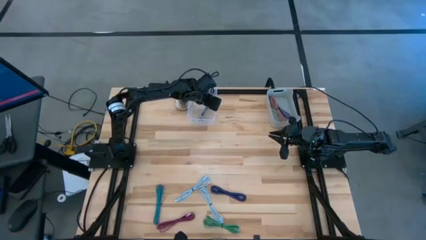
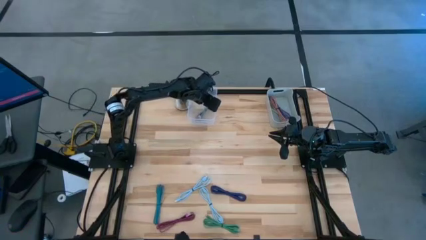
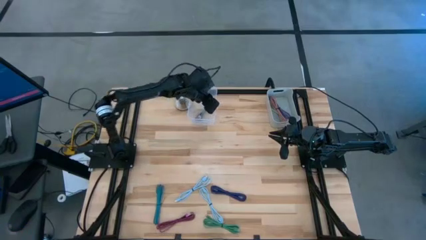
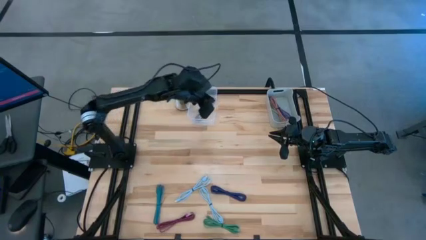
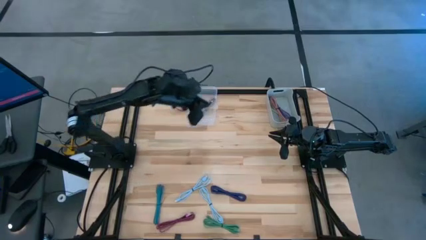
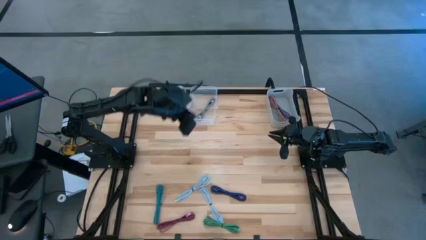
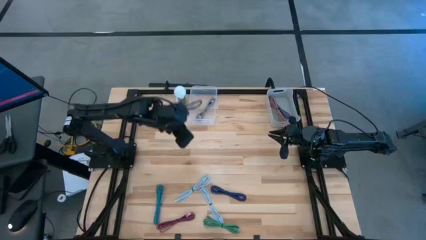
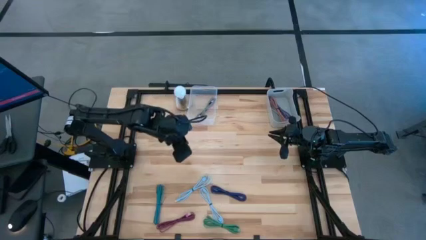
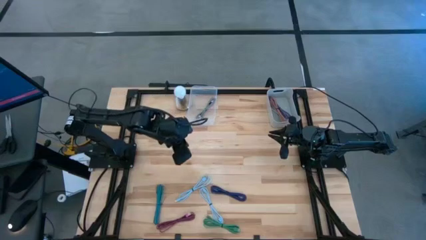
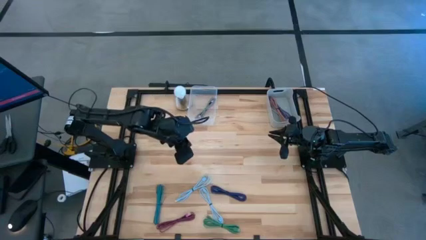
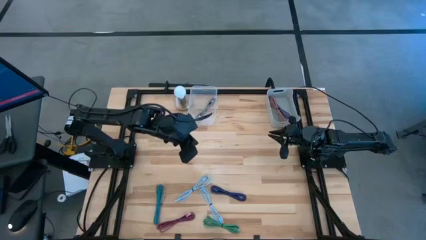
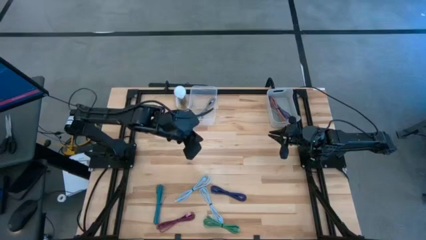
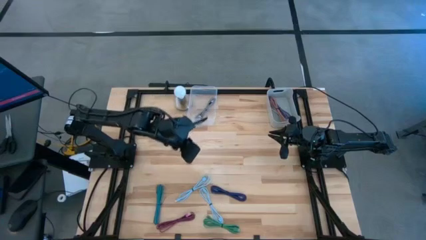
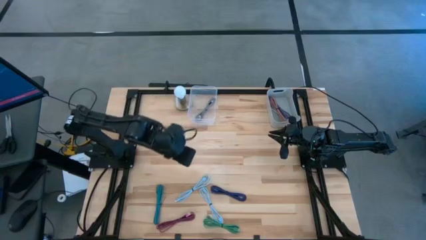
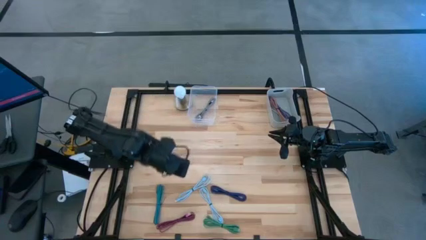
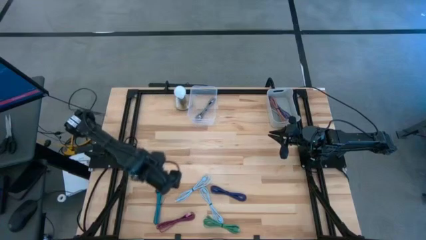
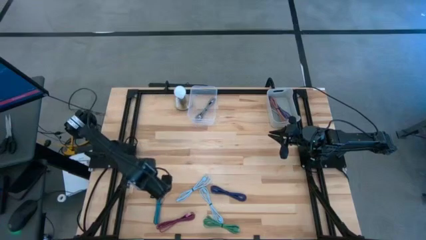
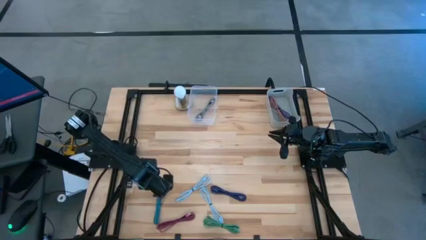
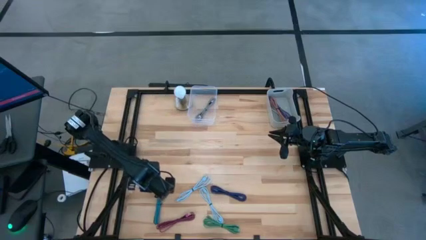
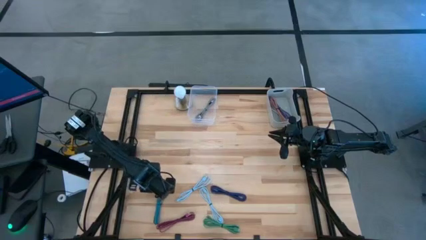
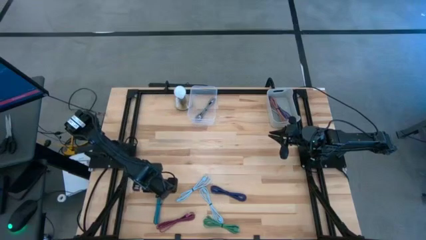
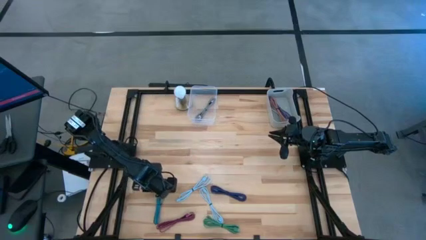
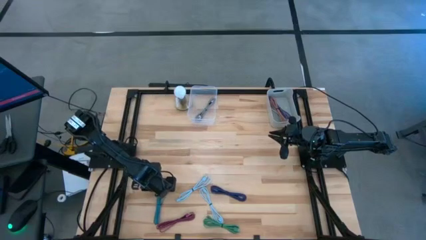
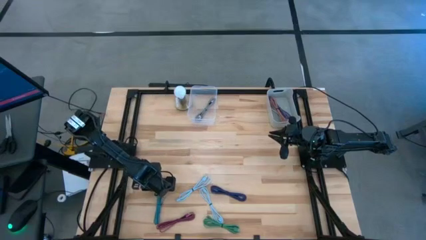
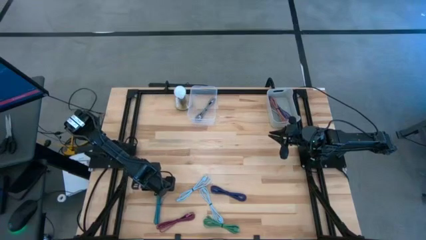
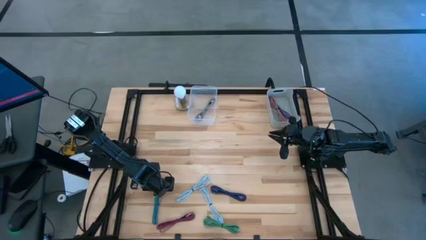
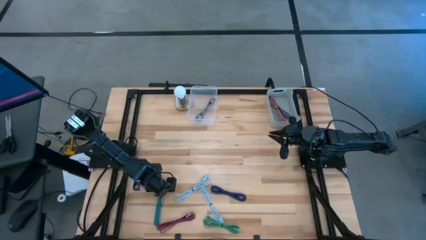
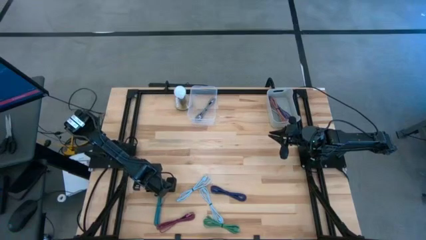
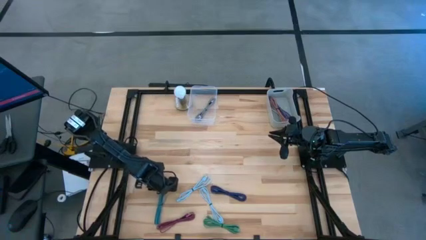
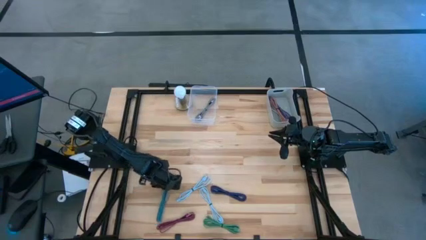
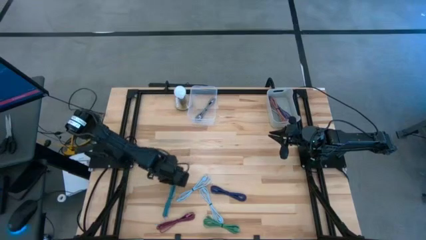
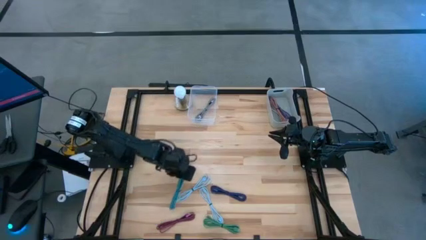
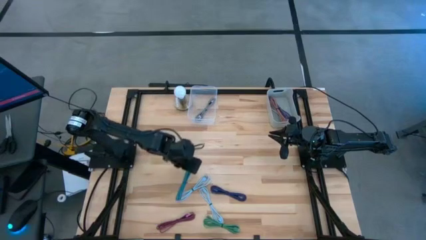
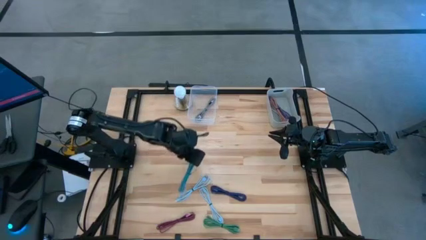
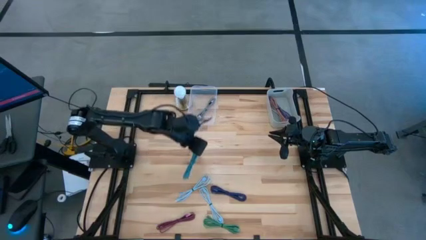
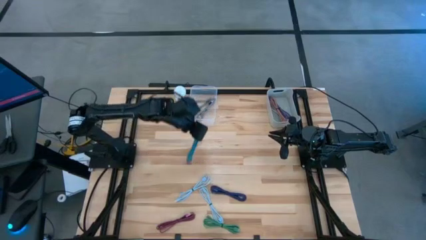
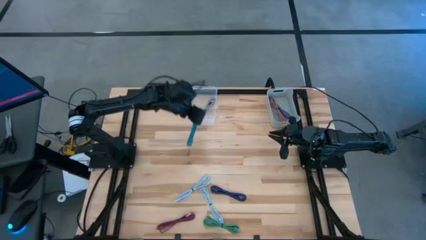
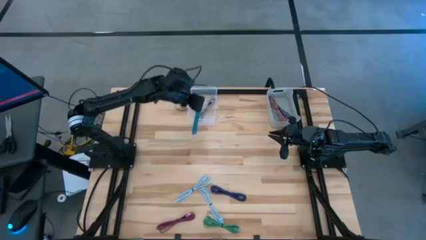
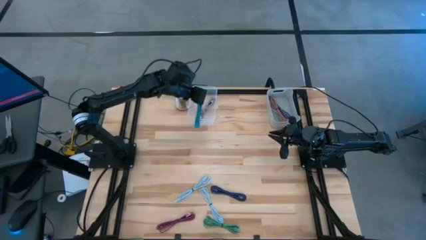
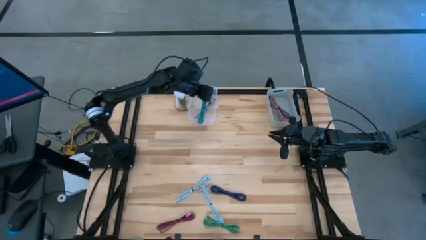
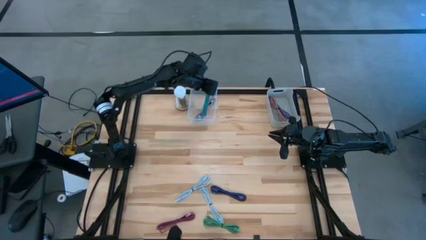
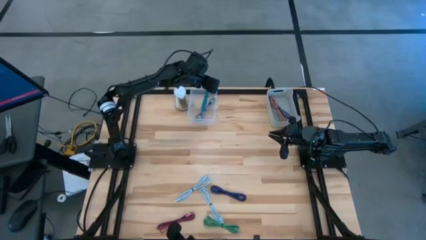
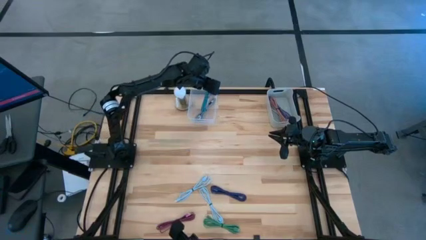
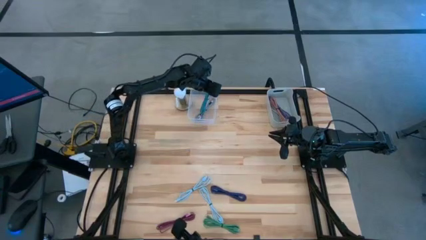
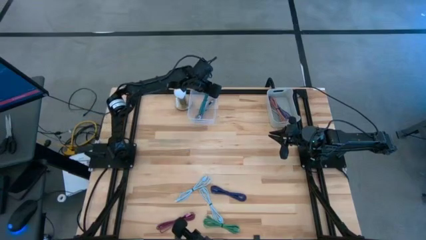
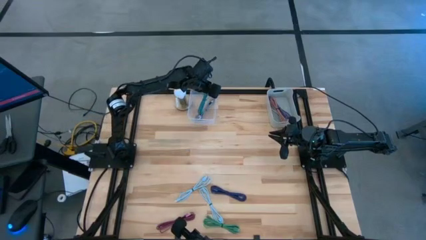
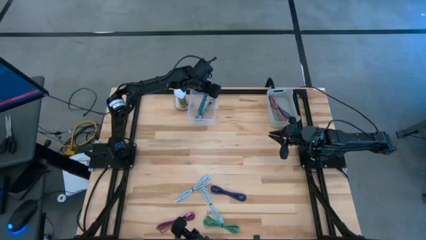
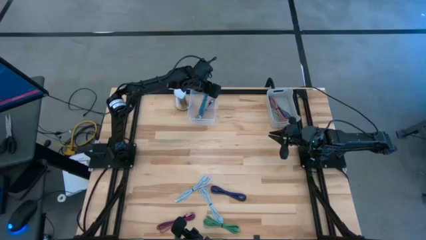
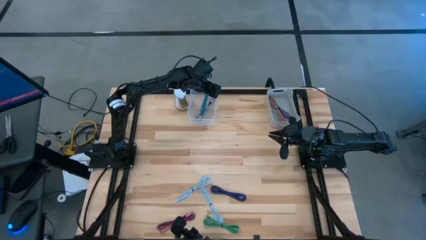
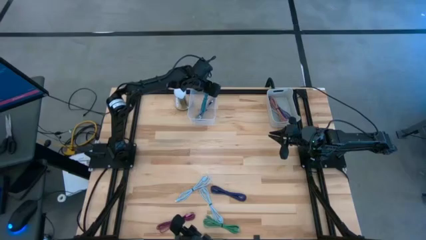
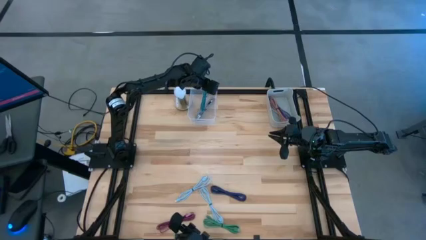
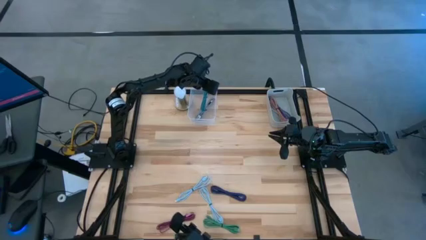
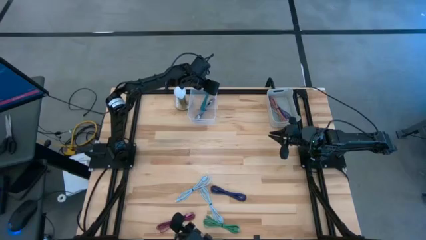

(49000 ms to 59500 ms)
Task: Pick & Place USB Port
Put the black blue charger cable into the transparent bin

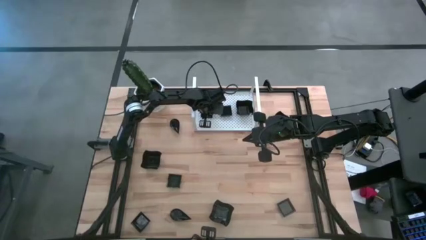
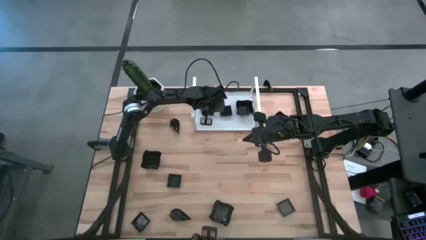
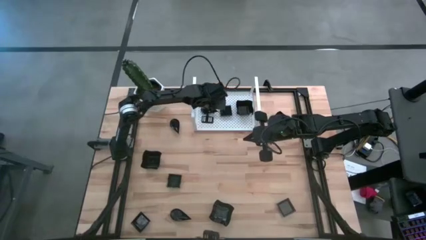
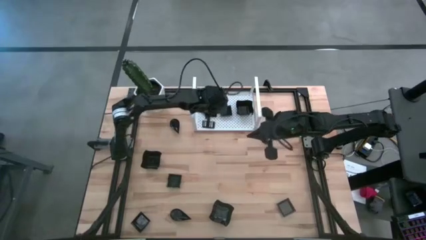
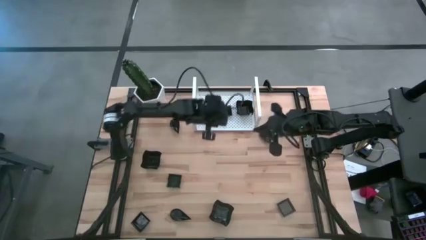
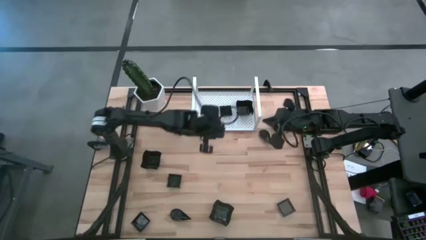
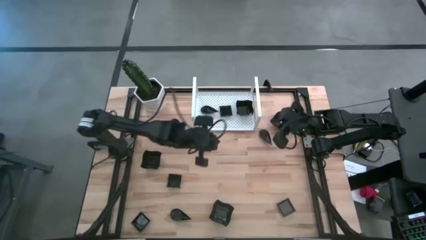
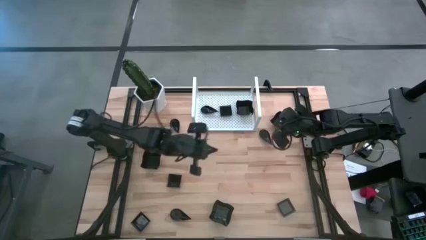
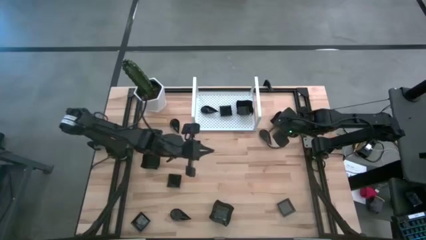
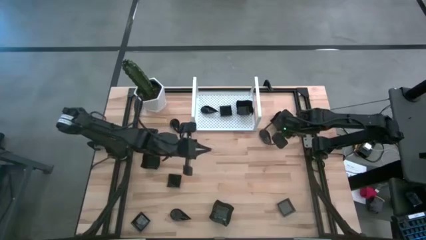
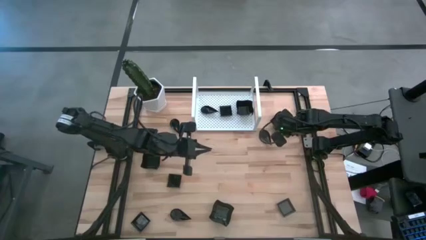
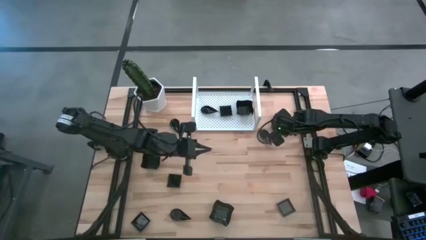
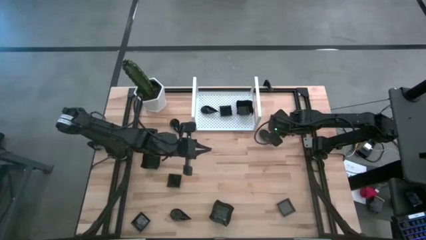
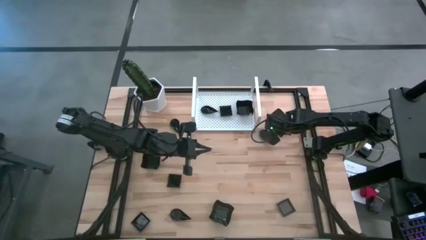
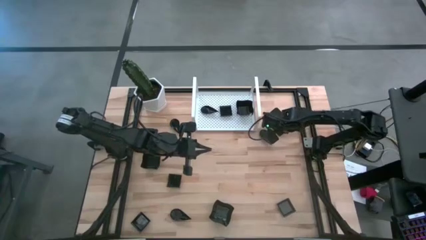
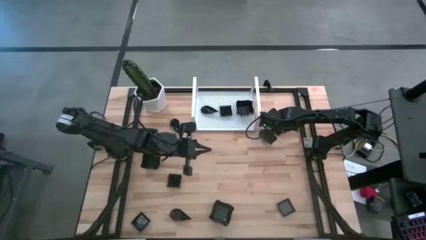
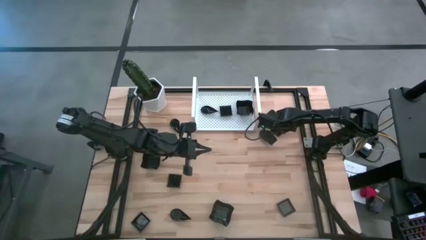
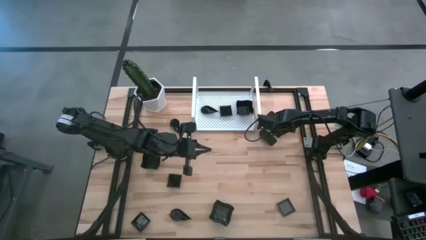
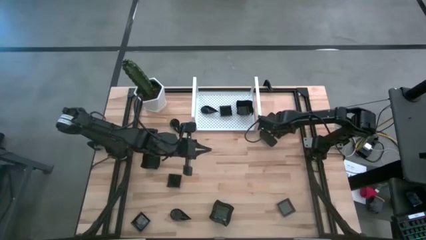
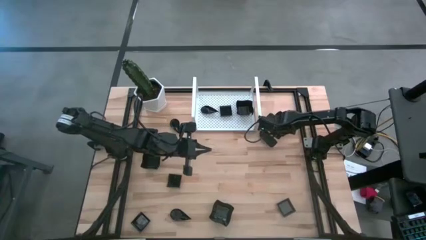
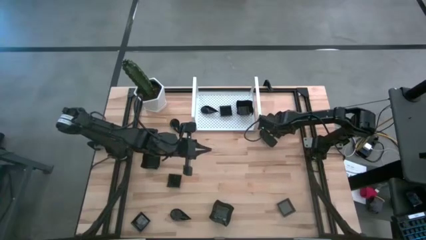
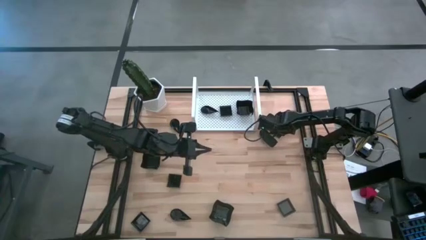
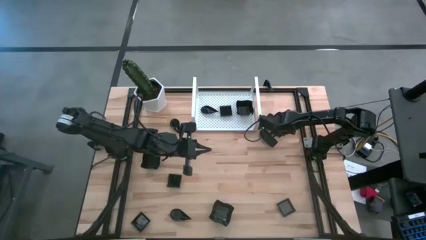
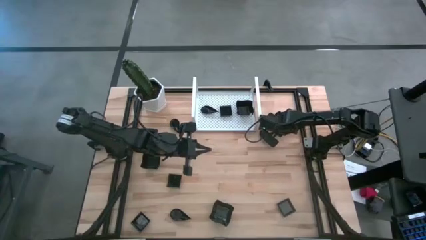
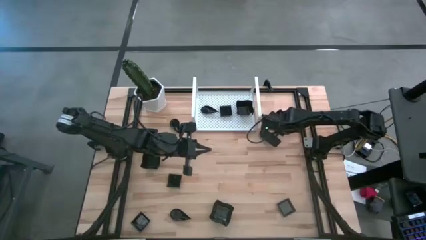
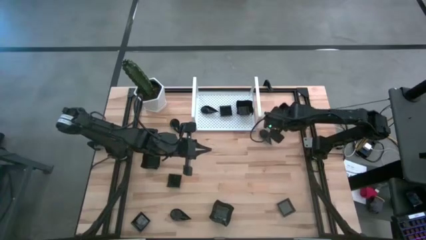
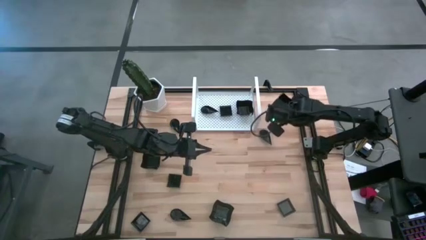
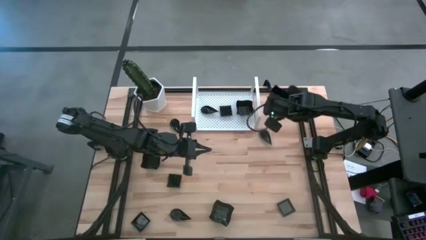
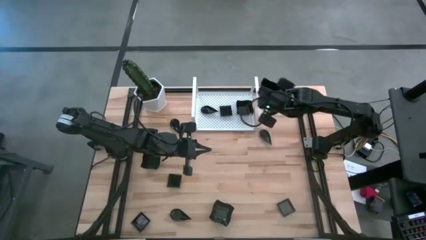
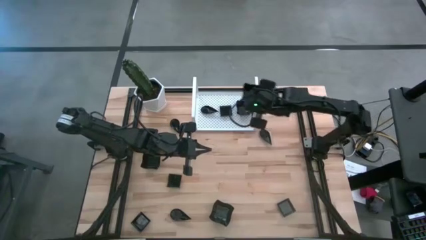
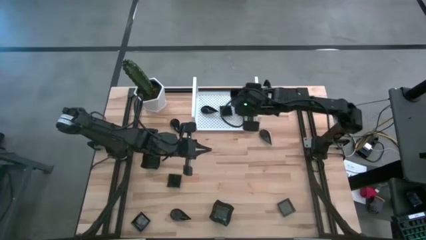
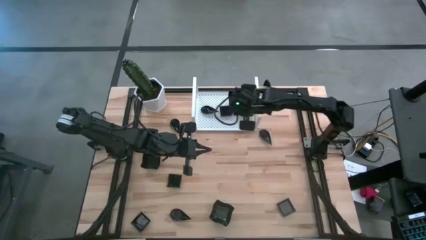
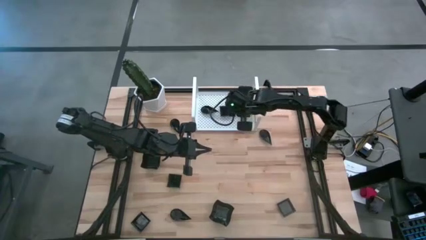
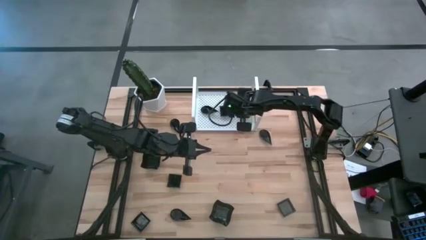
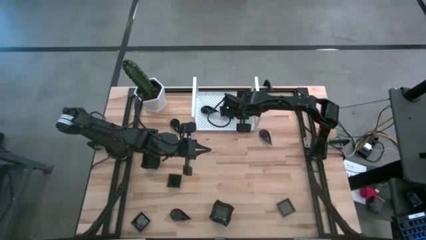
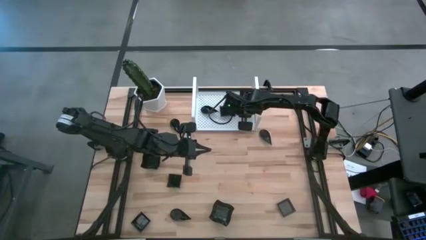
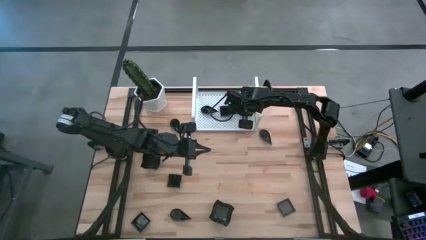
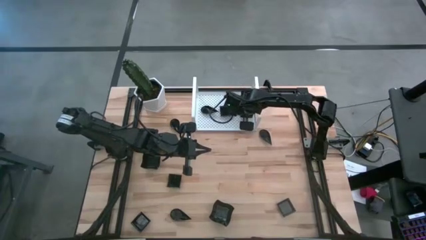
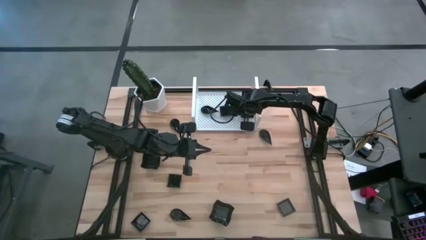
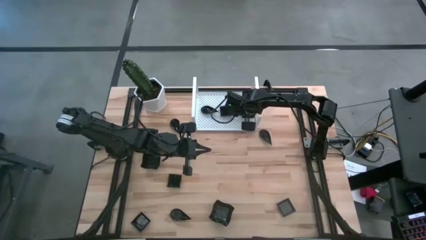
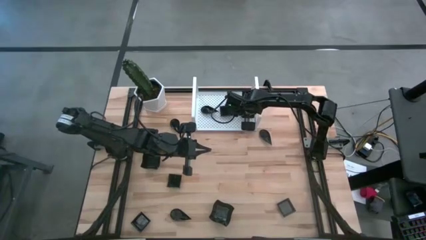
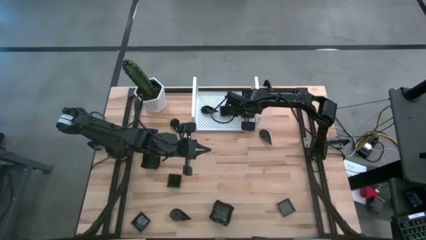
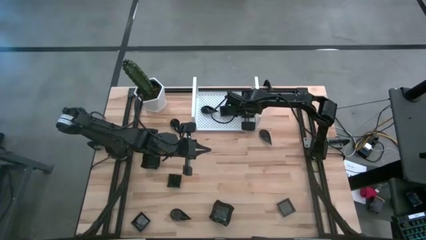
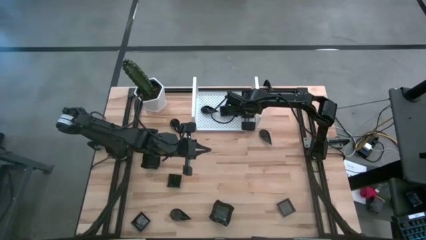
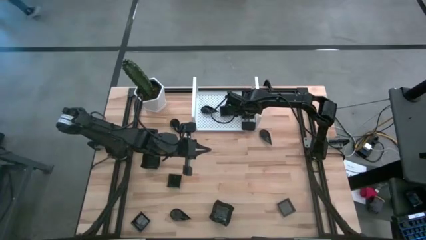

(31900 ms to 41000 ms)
Task: Pick & Place Mini shaped plates
Stack the black distorted square plate on top of the black distorted square plate on the shelf
